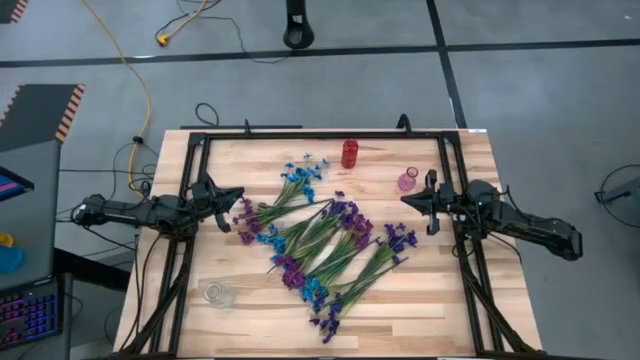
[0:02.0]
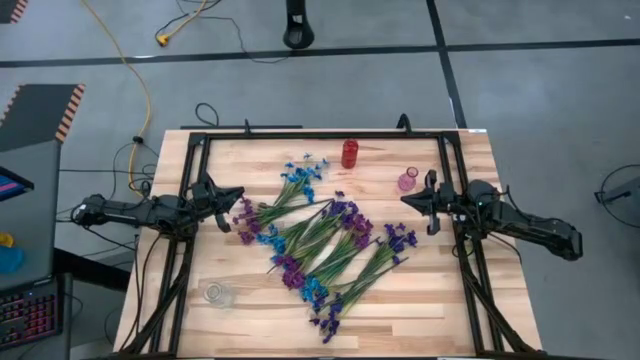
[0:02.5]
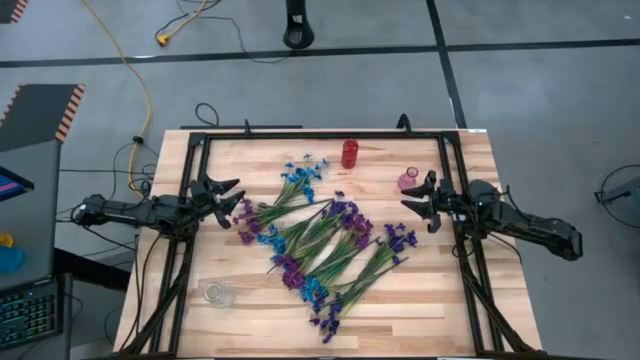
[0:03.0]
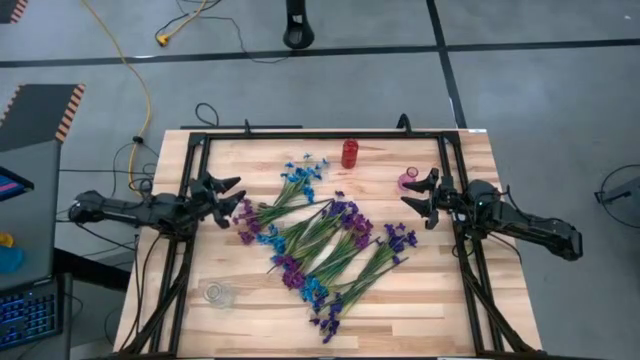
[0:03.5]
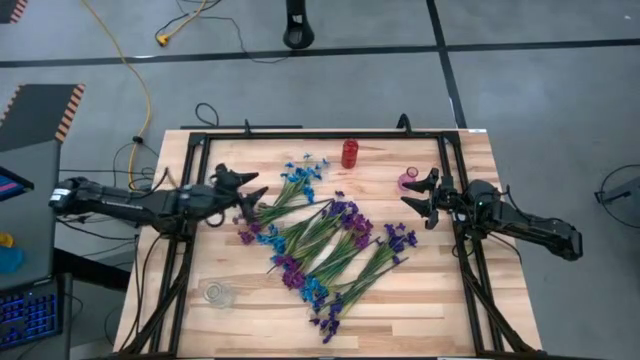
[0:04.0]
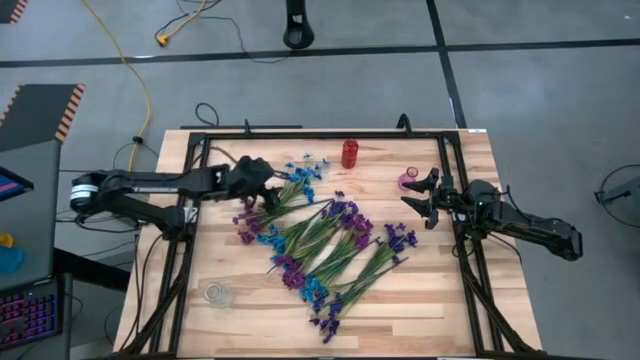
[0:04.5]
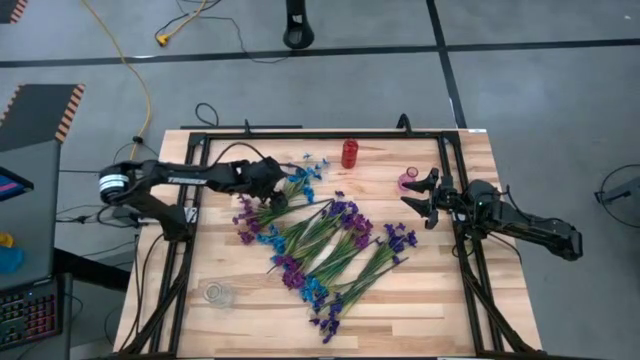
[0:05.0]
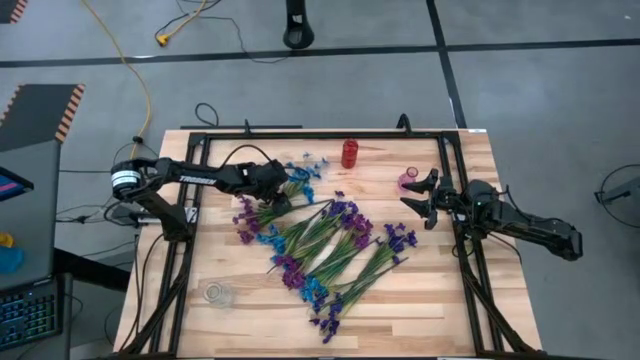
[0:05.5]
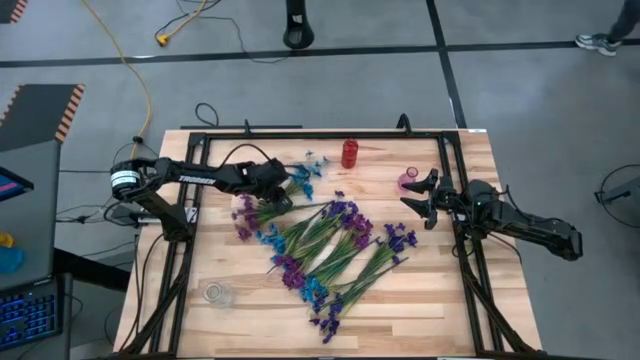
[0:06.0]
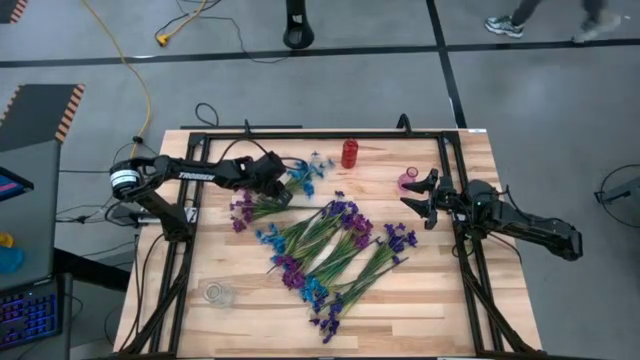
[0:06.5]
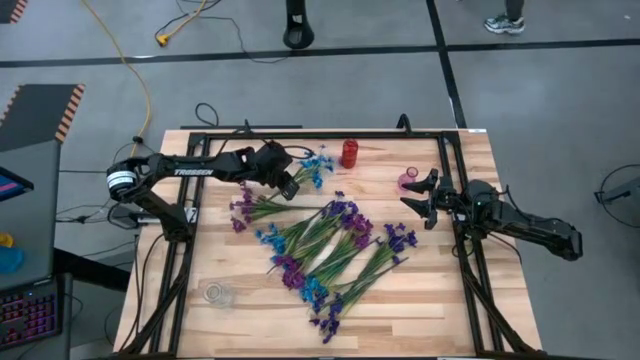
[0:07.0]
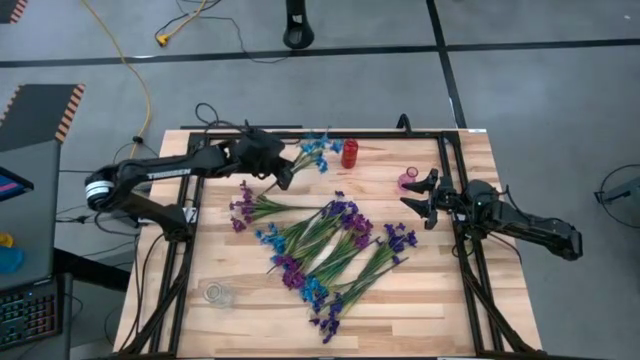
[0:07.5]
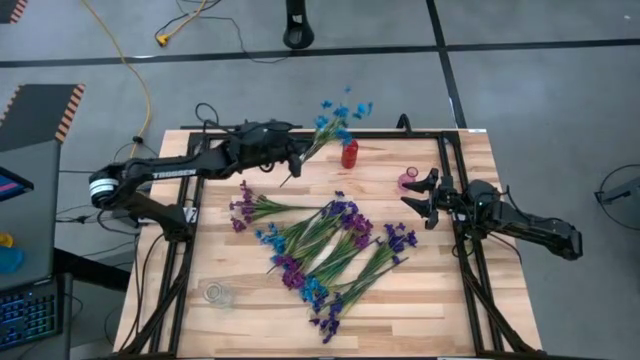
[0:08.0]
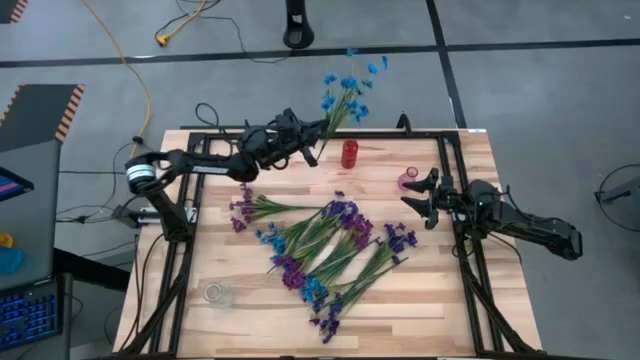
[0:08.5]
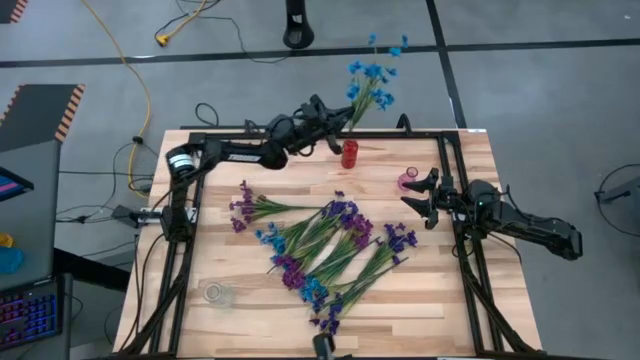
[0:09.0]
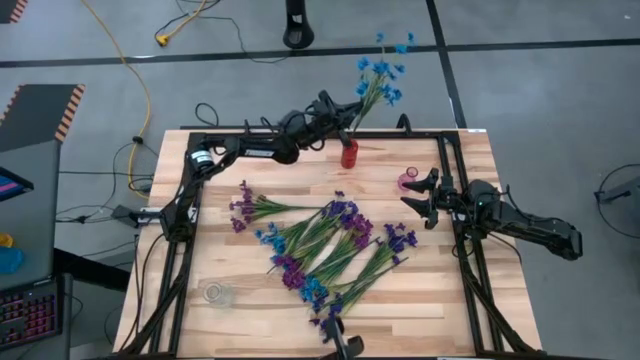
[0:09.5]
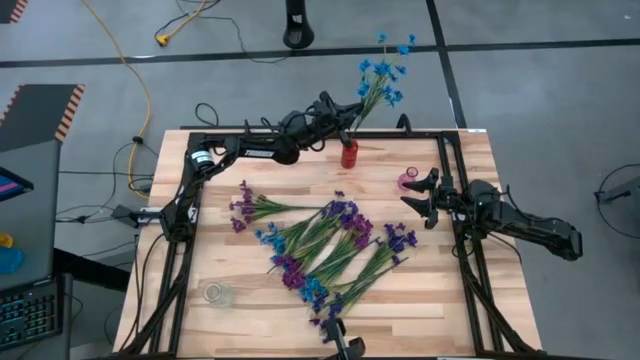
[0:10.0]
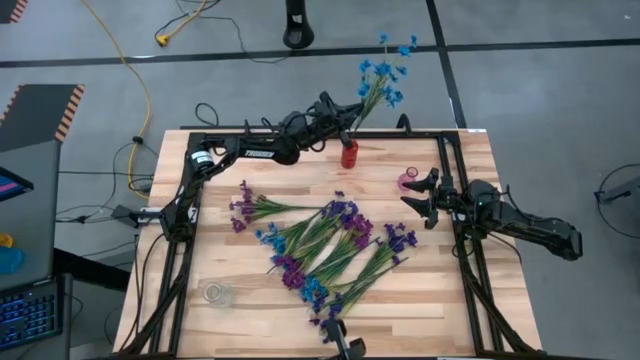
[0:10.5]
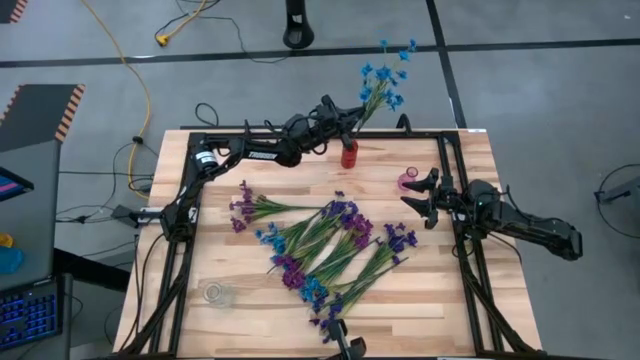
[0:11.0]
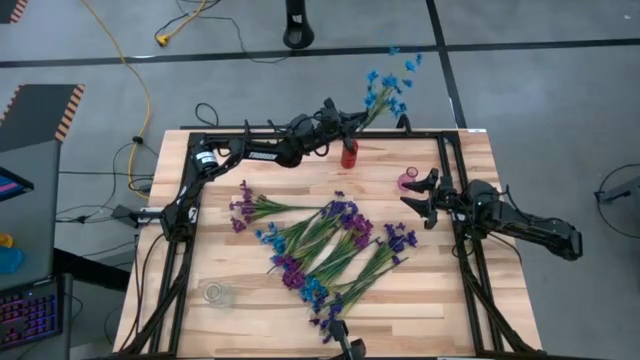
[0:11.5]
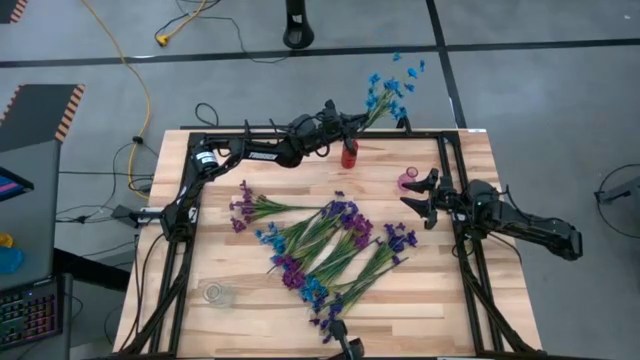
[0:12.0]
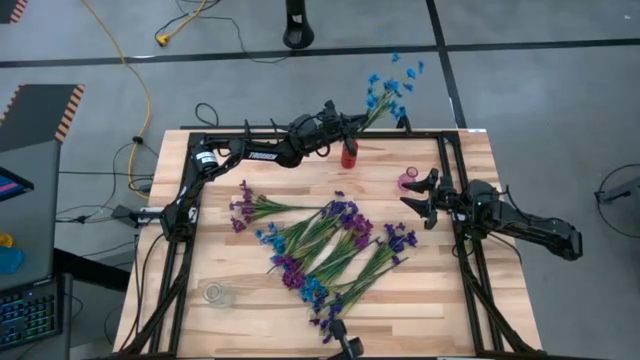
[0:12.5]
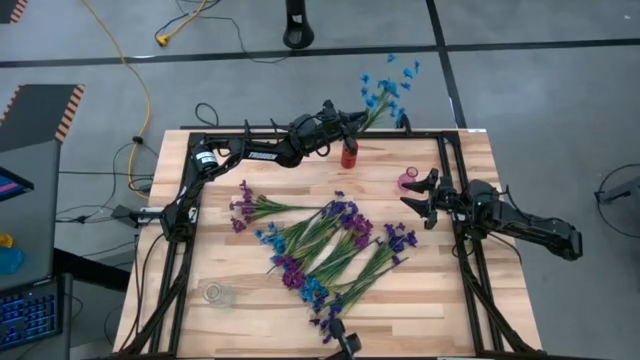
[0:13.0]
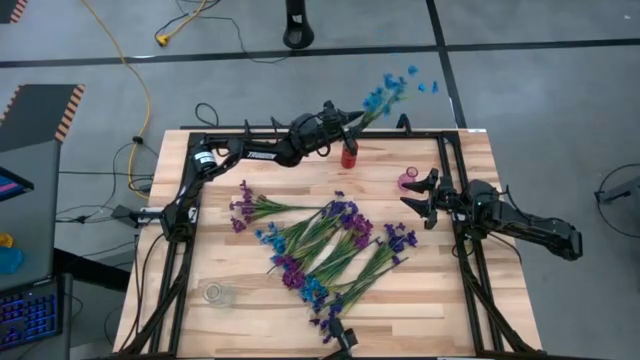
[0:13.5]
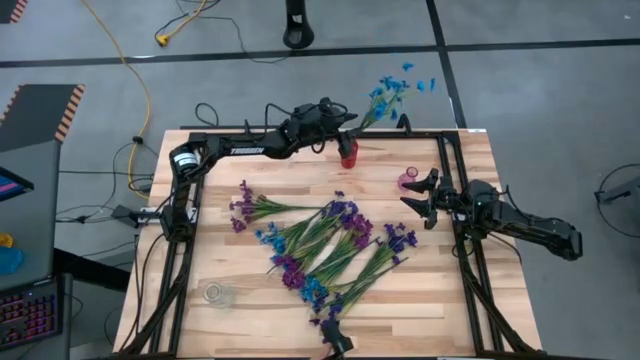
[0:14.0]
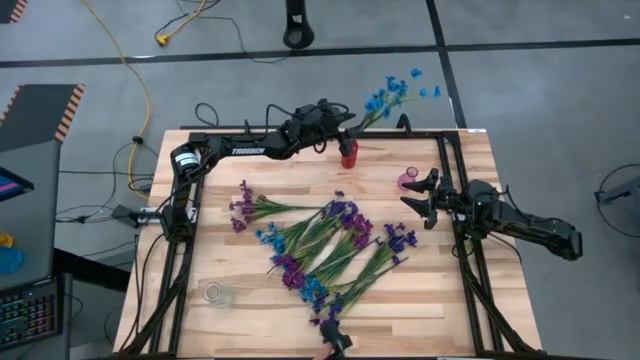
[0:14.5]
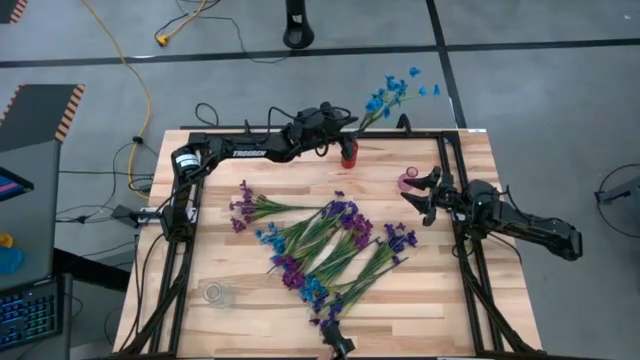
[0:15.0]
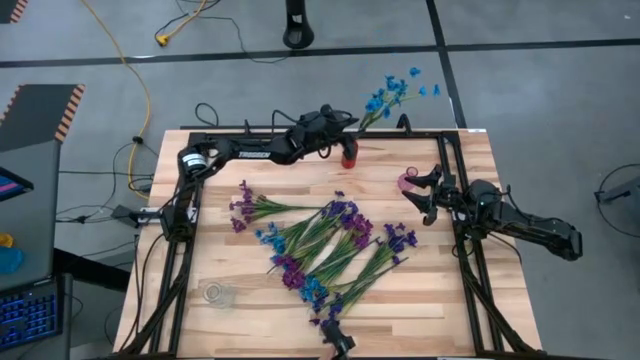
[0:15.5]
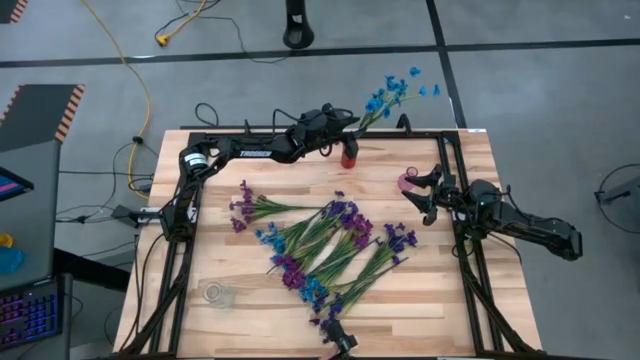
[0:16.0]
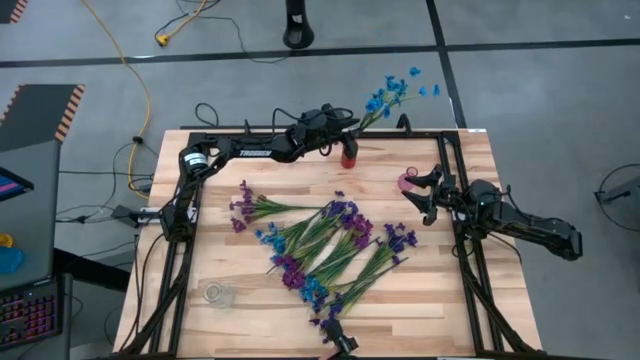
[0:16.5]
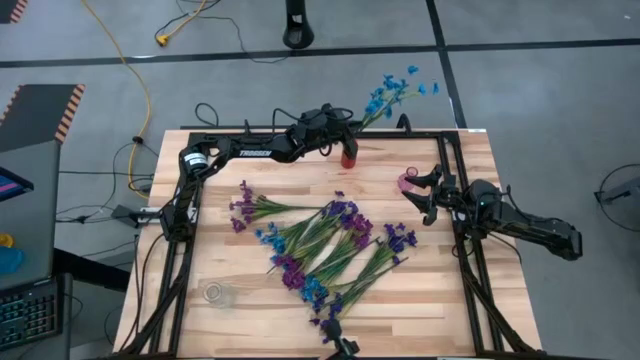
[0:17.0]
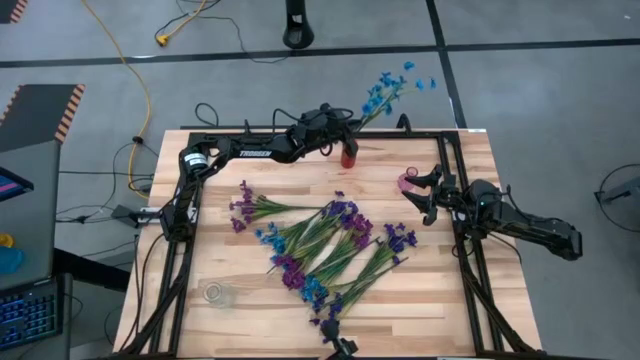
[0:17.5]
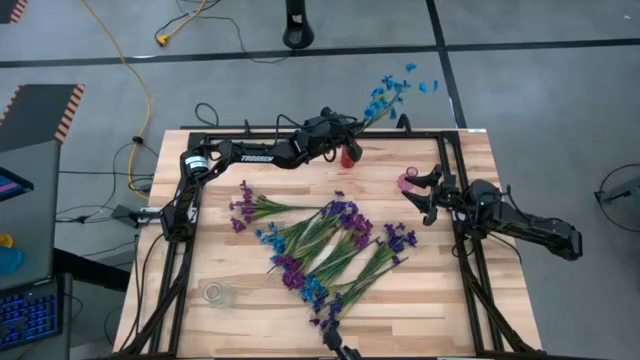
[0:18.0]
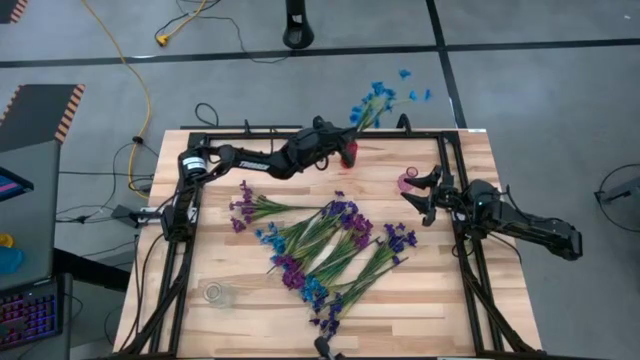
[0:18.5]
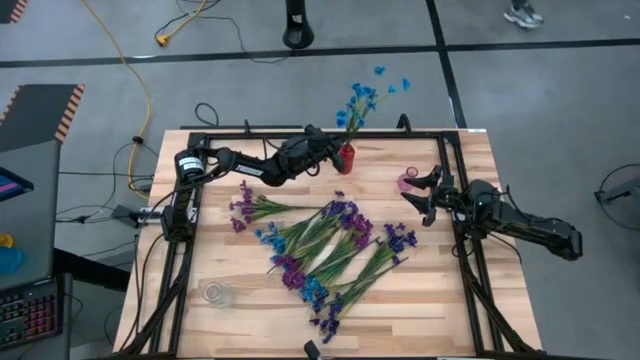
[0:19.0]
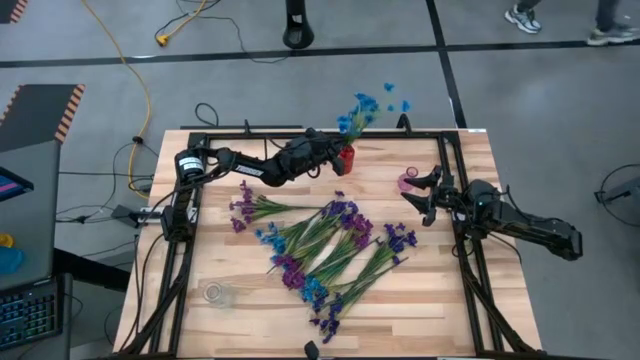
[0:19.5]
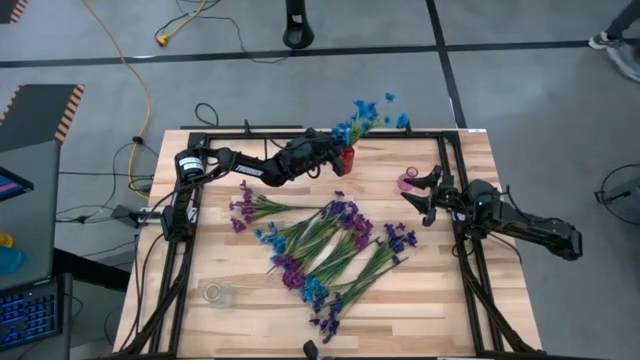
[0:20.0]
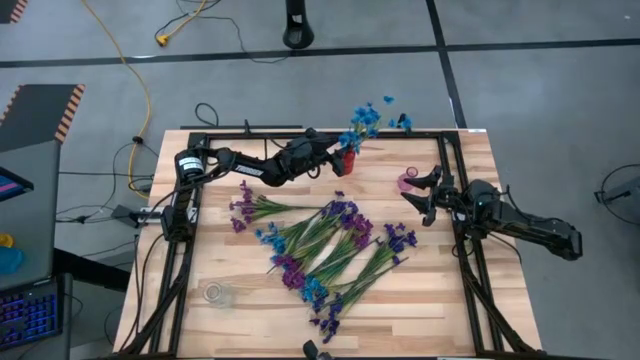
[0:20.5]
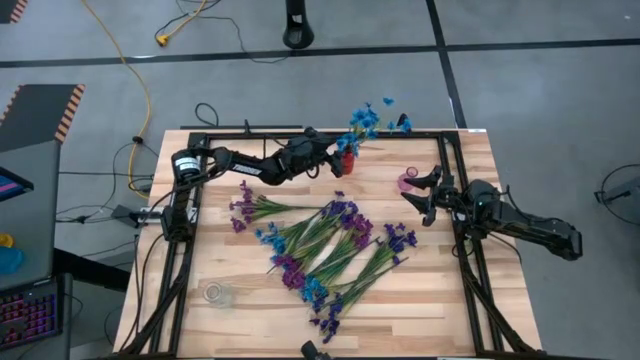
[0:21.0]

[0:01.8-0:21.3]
Task: Sort flowers into vase by color
Put the top blue flowers into the red vase
